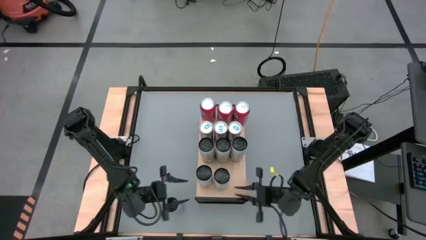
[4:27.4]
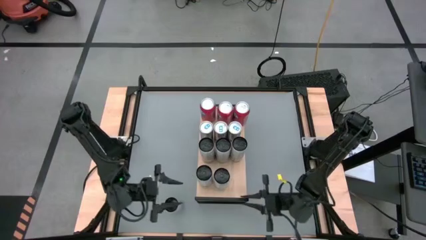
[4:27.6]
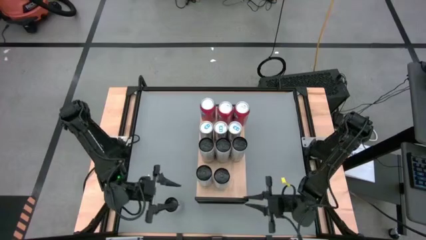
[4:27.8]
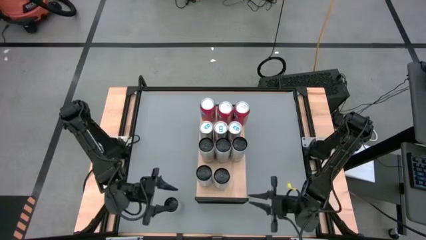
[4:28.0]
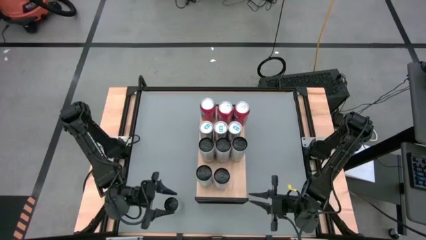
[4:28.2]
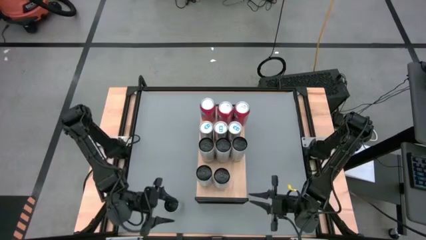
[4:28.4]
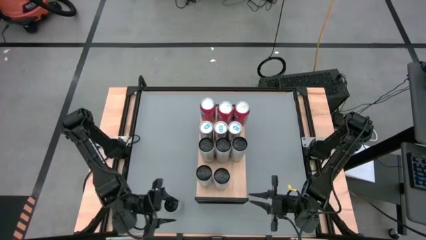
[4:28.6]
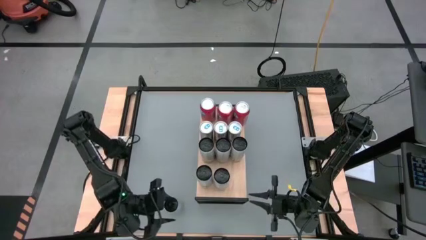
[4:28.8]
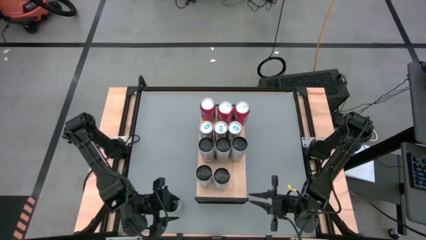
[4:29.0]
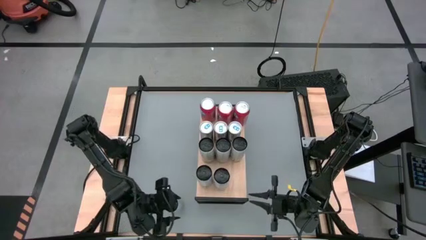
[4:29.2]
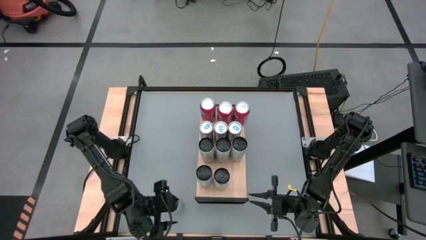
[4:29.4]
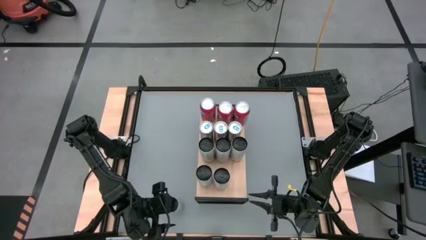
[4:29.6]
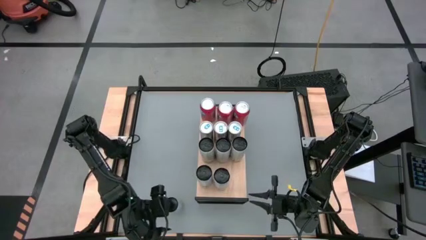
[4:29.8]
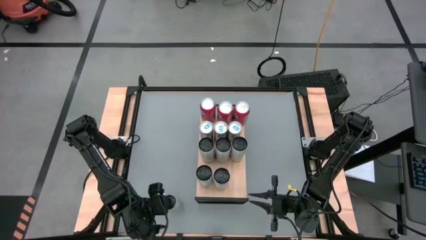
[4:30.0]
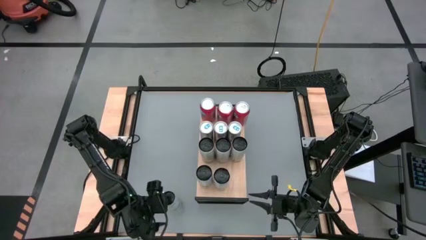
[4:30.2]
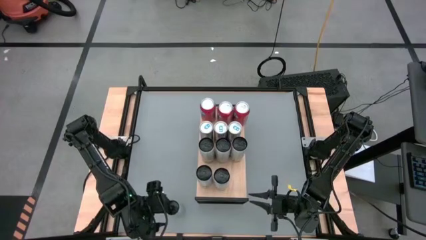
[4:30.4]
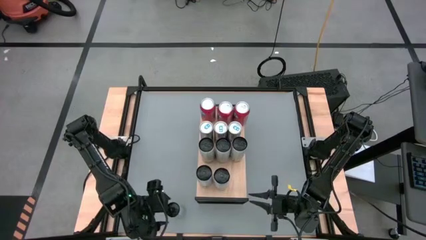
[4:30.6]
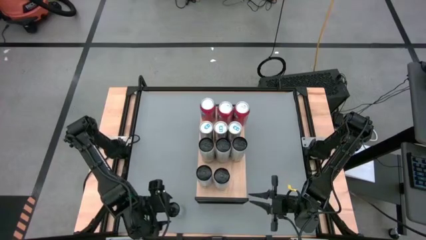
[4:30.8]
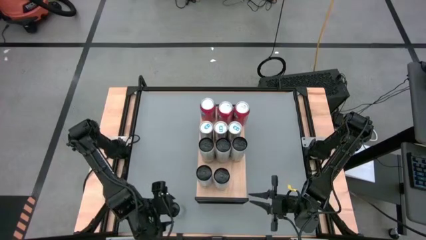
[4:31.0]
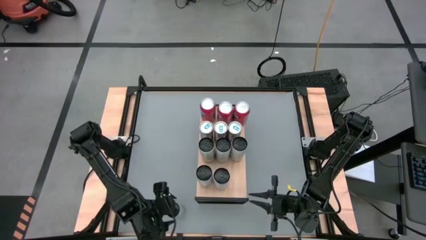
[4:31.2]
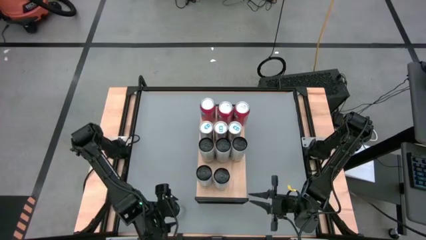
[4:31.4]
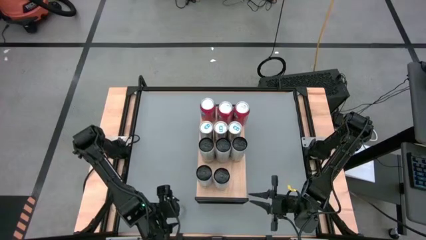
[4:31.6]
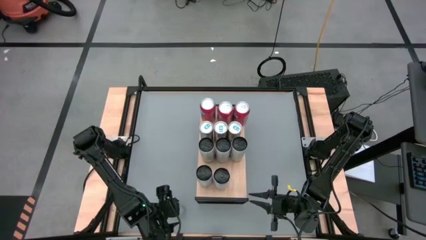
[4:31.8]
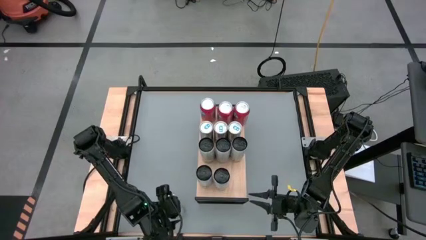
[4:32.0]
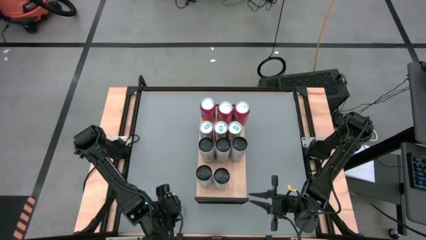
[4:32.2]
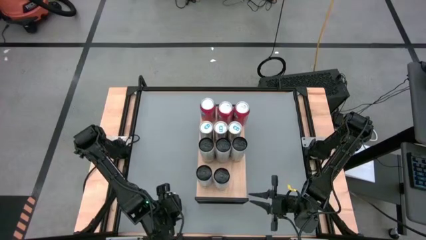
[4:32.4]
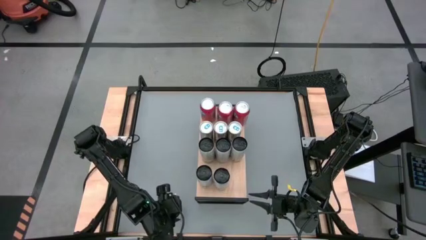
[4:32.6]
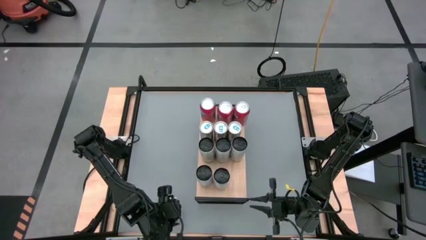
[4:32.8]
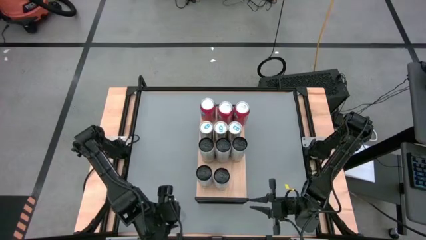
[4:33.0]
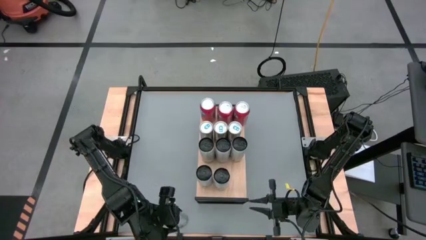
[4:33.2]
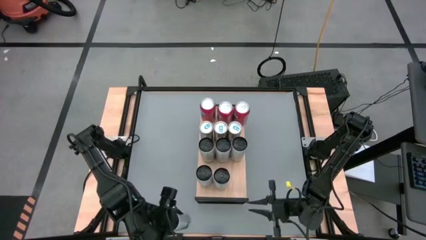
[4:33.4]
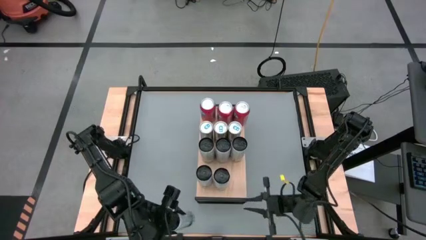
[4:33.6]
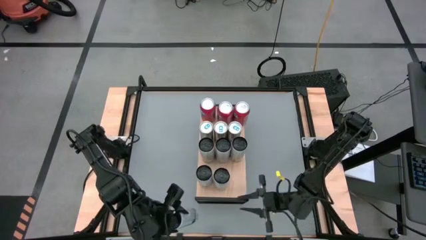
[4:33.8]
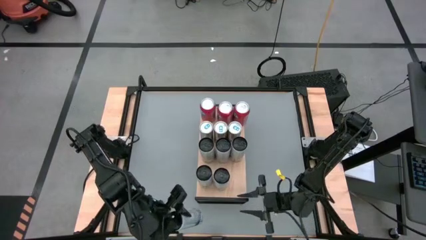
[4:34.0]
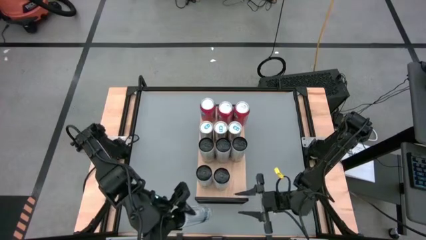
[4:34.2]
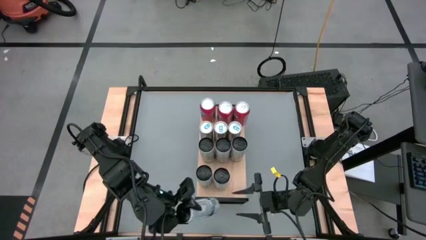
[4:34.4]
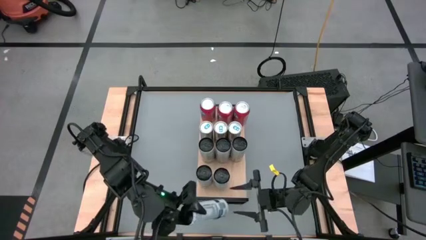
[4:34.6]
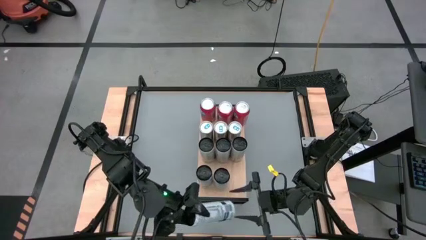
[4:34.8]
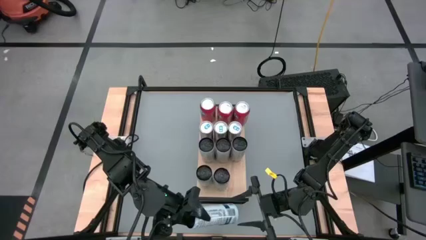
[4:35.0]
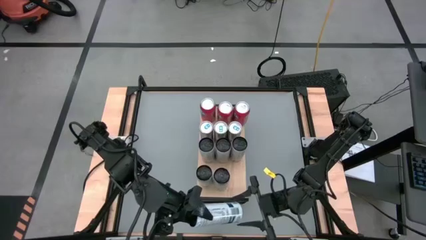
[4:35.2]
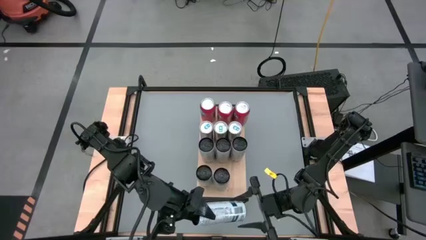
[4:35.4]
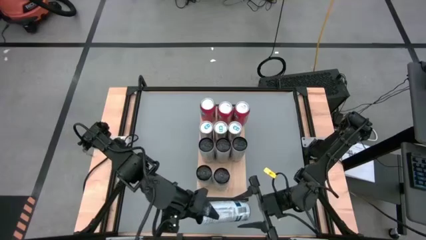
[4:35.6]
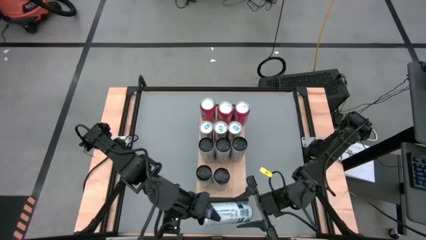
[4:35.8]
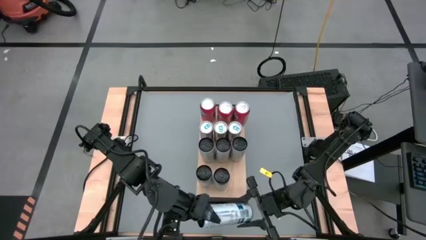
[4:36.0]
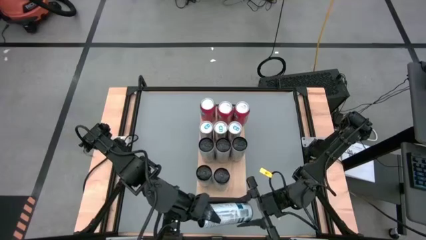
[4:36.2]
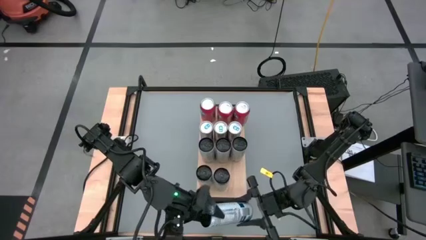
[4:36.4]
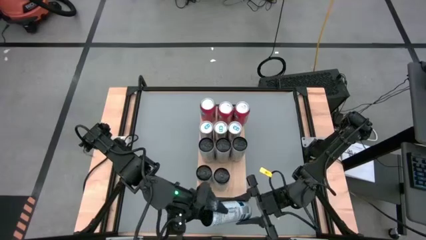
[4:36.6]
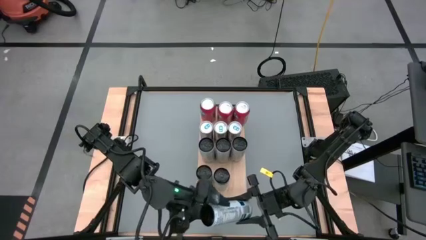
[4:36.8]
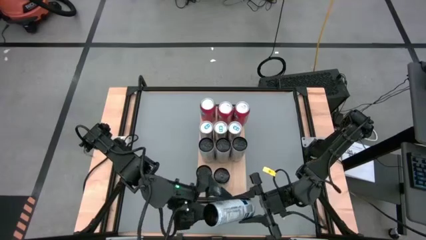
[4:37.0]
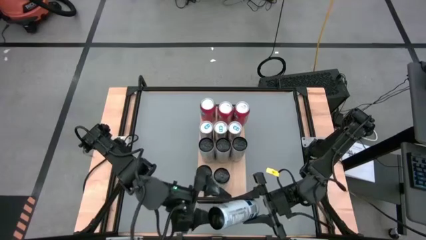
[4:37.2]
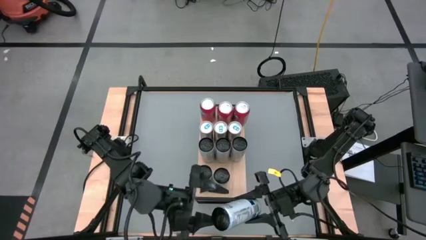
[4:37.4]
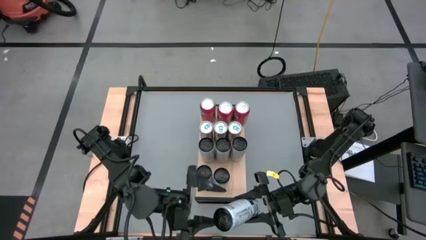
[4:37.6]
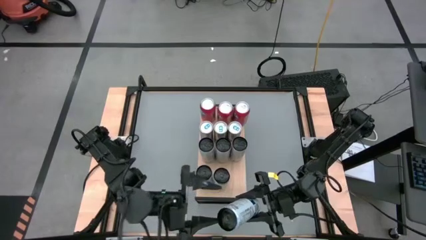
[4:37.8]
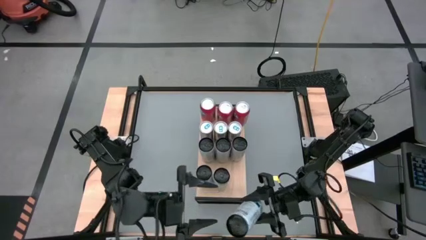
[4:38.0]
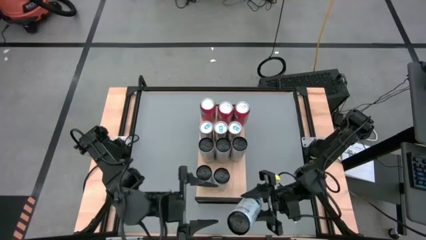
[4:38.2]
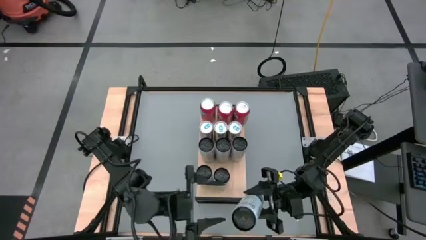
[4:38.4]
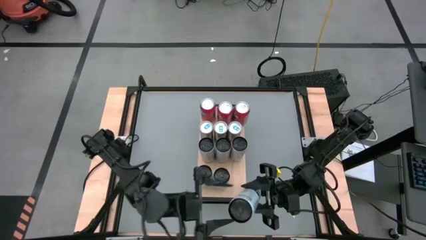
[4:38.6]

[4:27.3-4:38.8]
Task: Place canned beverage on shelf
Put the white soda can on the shelf aligned with the other white soda can
